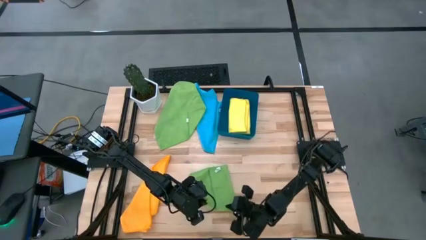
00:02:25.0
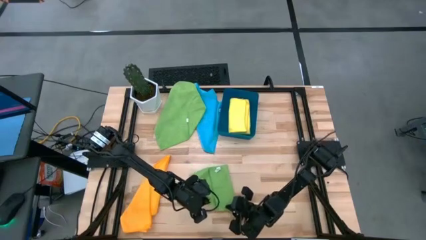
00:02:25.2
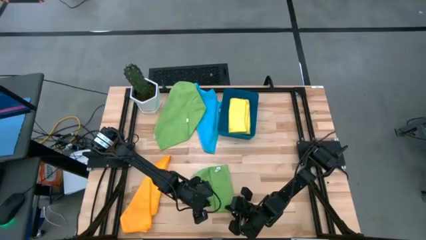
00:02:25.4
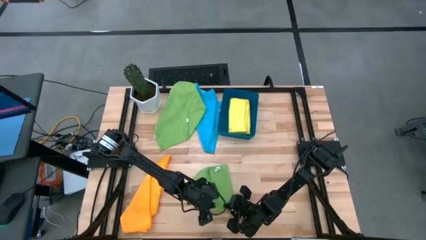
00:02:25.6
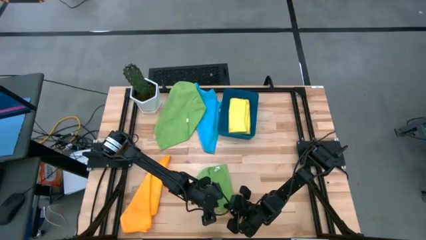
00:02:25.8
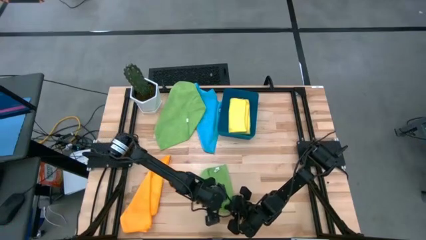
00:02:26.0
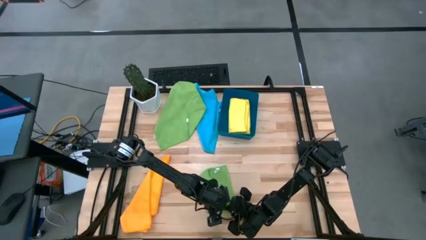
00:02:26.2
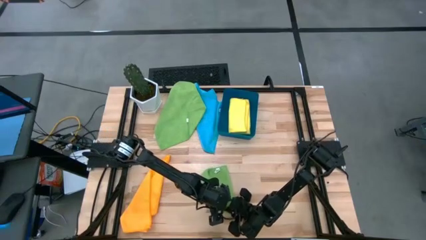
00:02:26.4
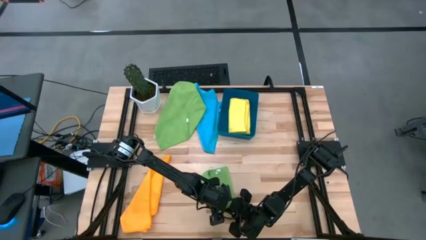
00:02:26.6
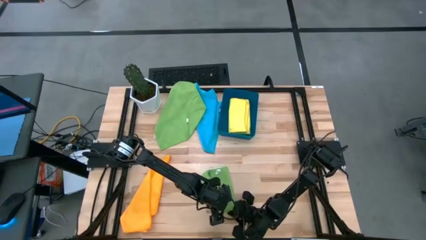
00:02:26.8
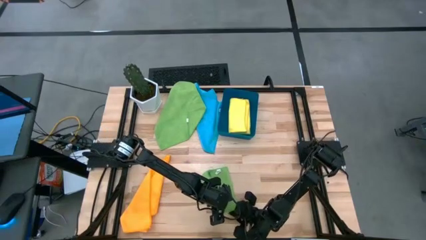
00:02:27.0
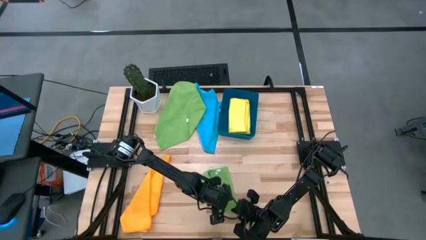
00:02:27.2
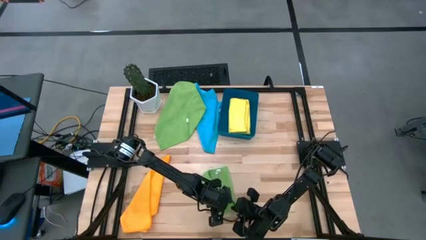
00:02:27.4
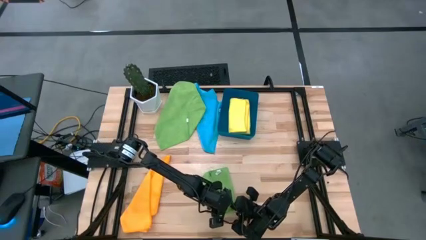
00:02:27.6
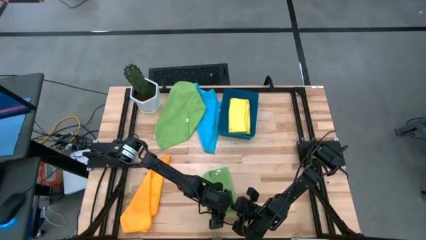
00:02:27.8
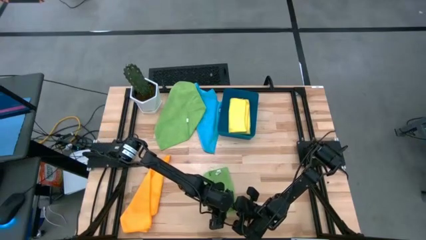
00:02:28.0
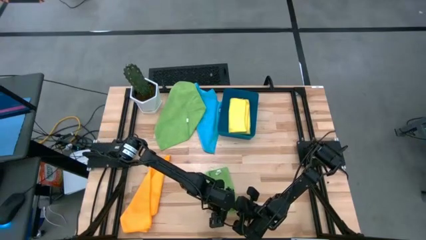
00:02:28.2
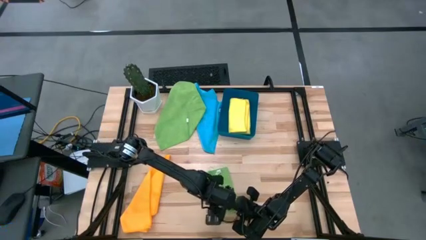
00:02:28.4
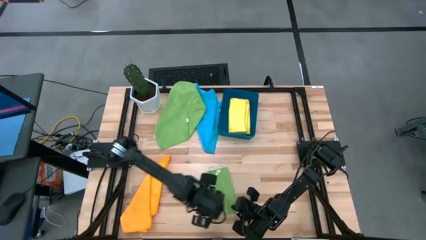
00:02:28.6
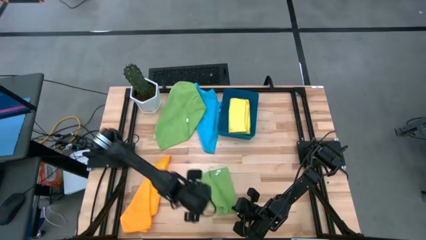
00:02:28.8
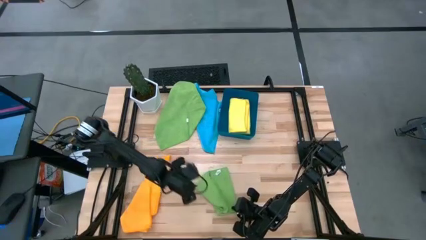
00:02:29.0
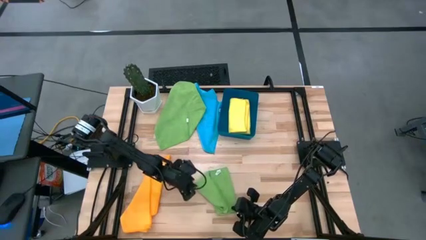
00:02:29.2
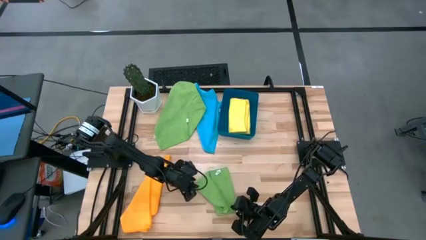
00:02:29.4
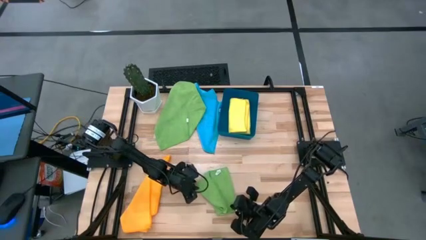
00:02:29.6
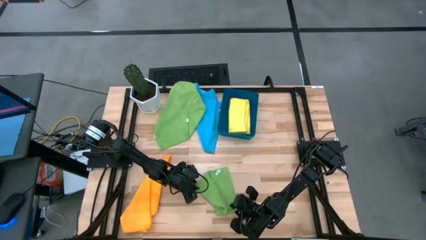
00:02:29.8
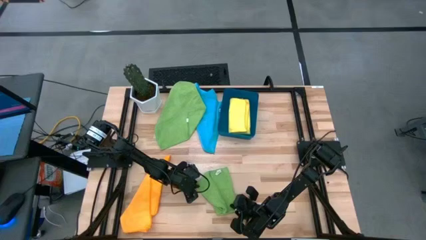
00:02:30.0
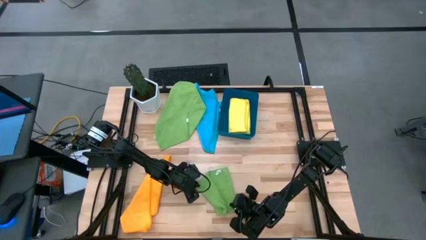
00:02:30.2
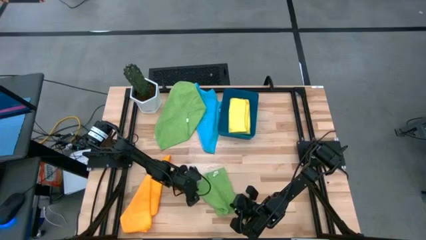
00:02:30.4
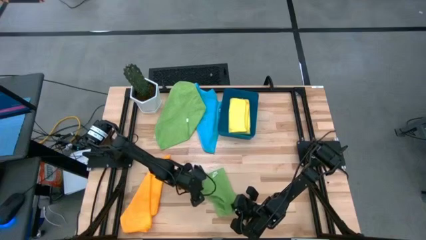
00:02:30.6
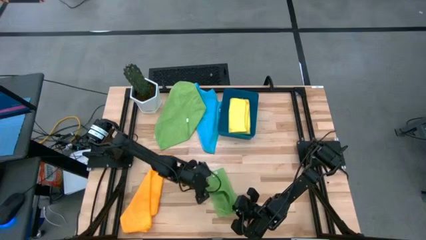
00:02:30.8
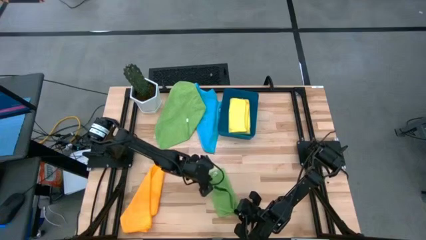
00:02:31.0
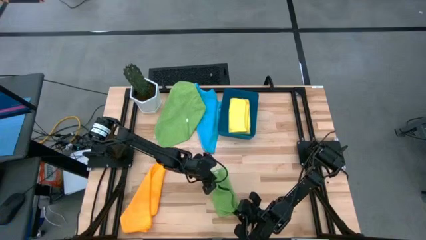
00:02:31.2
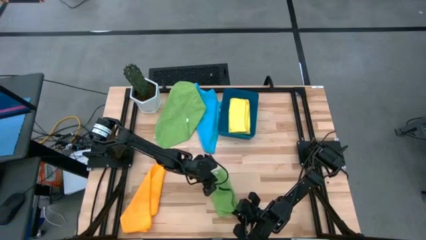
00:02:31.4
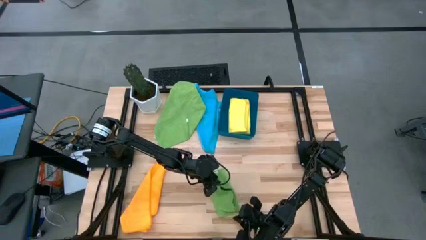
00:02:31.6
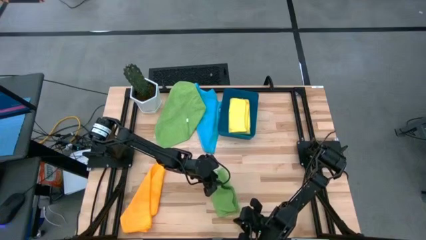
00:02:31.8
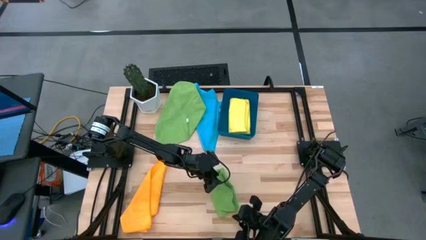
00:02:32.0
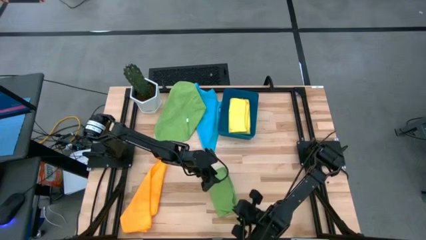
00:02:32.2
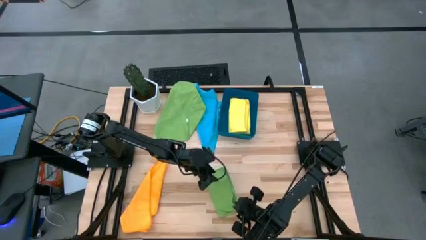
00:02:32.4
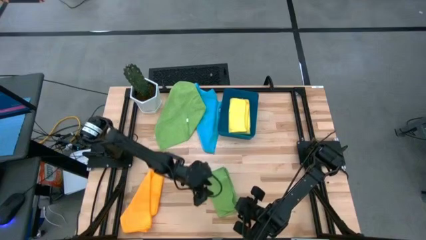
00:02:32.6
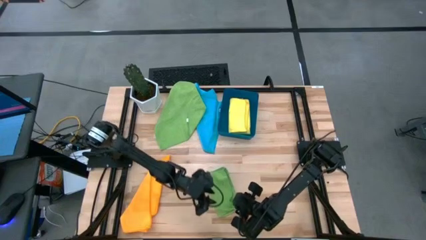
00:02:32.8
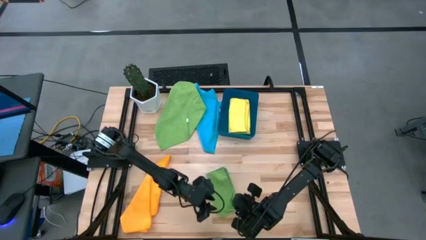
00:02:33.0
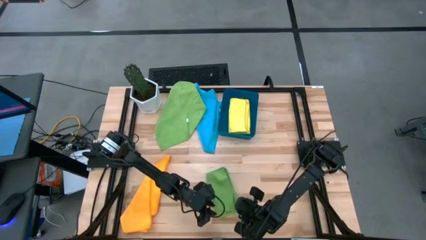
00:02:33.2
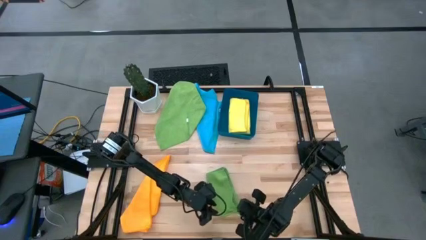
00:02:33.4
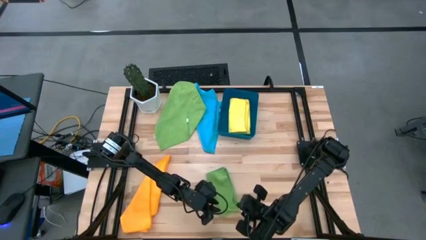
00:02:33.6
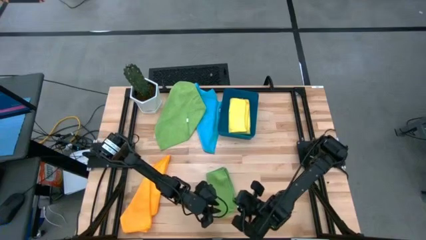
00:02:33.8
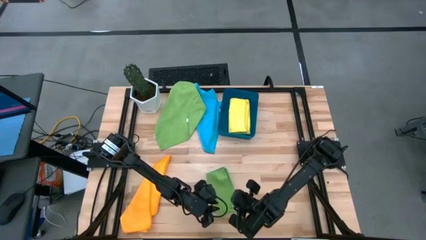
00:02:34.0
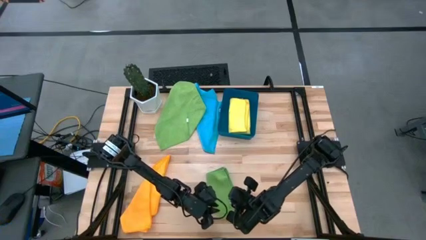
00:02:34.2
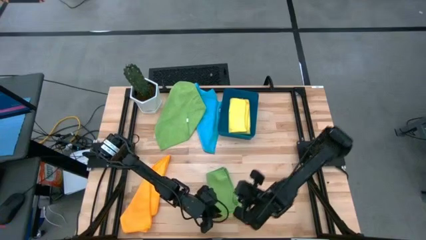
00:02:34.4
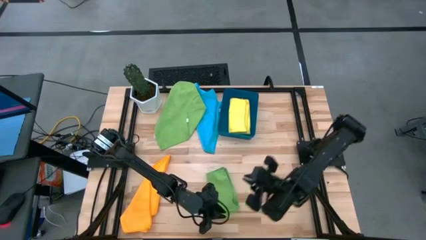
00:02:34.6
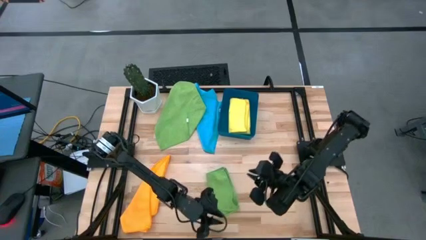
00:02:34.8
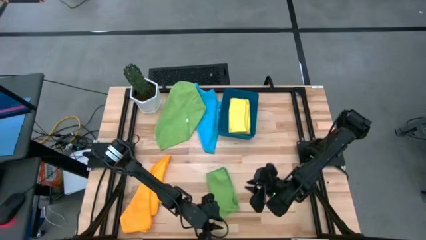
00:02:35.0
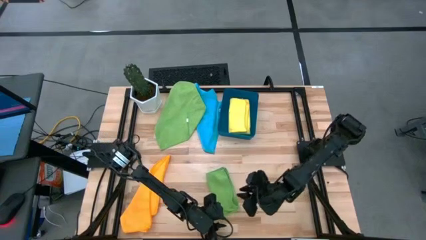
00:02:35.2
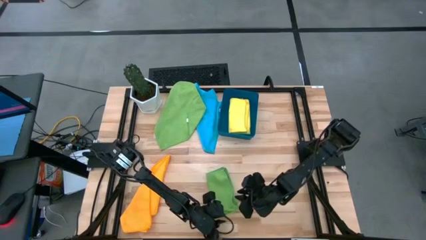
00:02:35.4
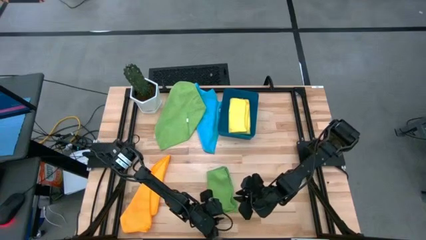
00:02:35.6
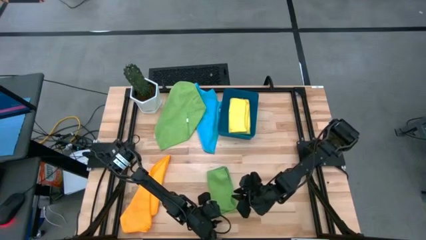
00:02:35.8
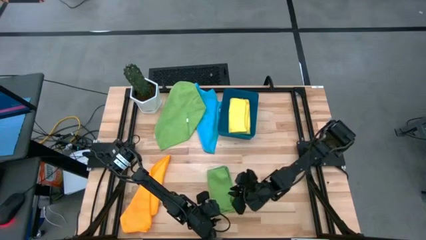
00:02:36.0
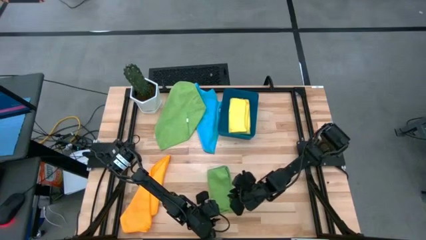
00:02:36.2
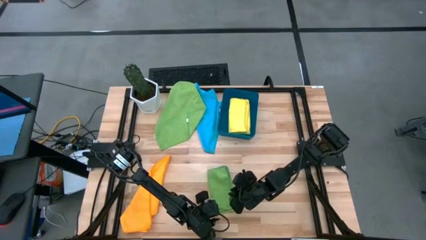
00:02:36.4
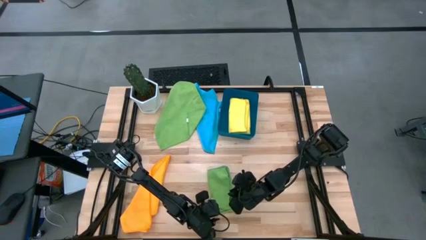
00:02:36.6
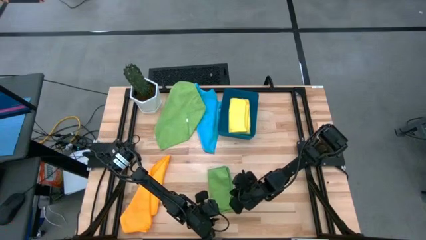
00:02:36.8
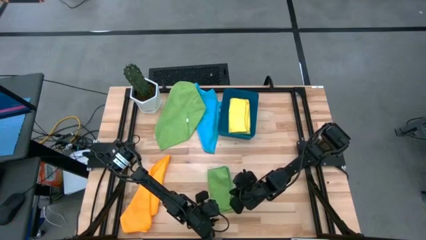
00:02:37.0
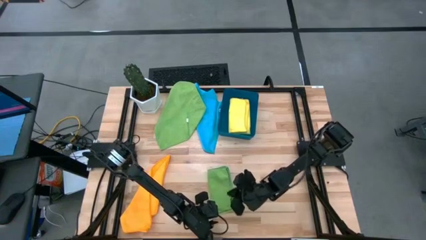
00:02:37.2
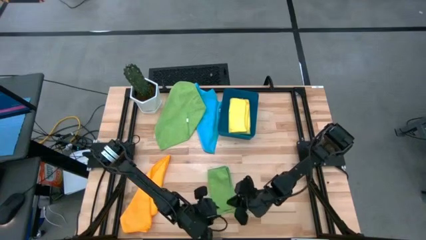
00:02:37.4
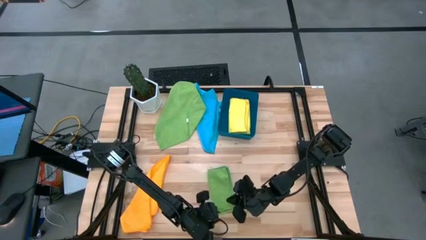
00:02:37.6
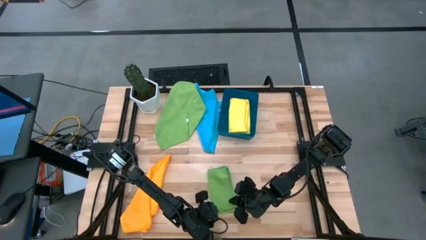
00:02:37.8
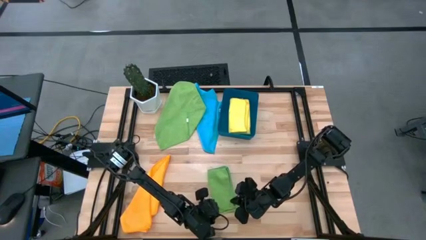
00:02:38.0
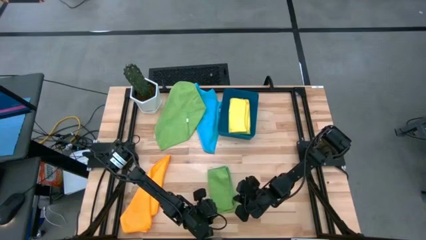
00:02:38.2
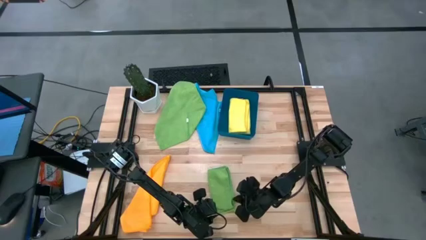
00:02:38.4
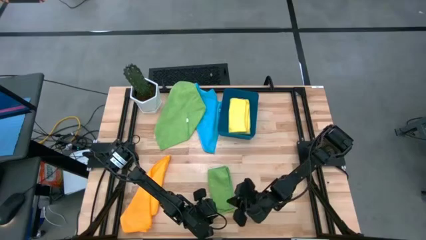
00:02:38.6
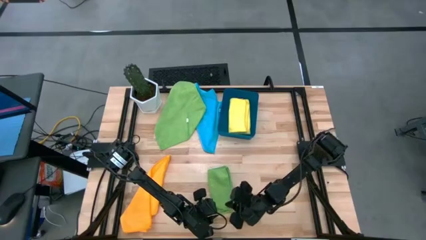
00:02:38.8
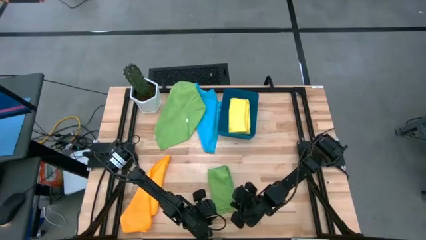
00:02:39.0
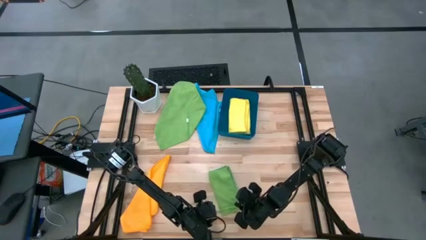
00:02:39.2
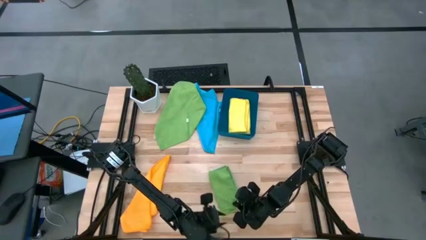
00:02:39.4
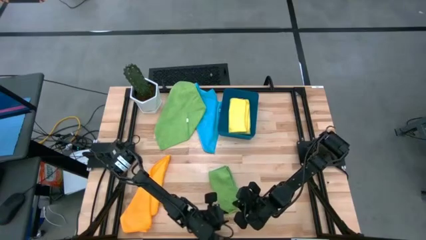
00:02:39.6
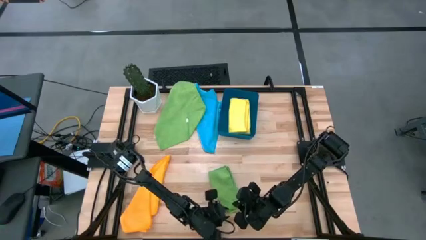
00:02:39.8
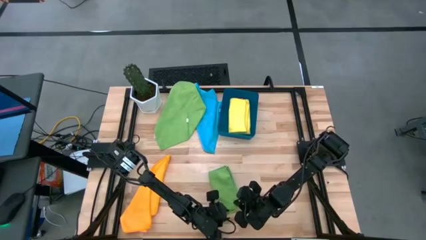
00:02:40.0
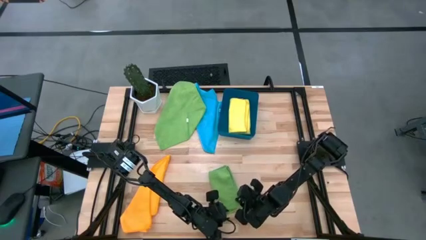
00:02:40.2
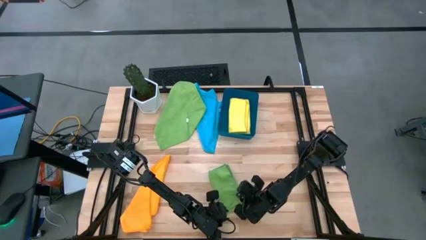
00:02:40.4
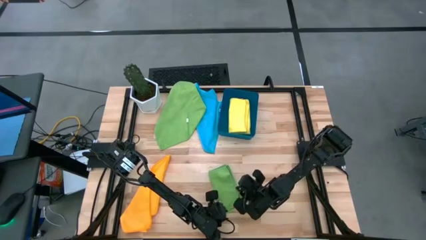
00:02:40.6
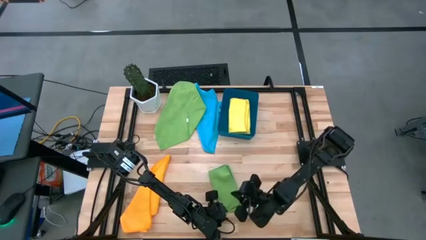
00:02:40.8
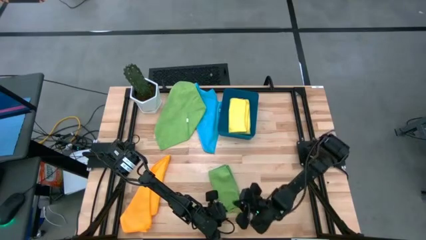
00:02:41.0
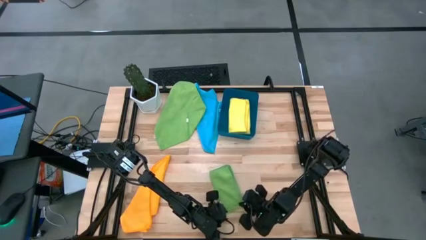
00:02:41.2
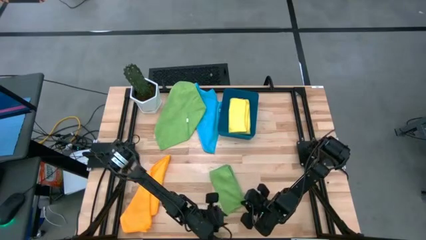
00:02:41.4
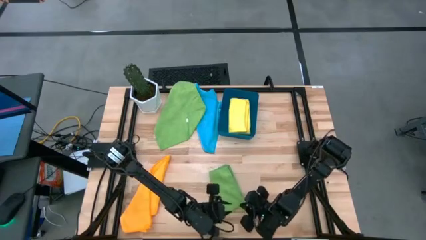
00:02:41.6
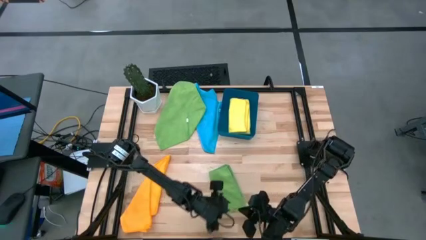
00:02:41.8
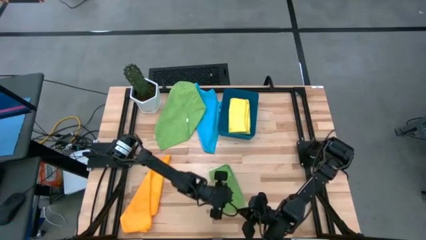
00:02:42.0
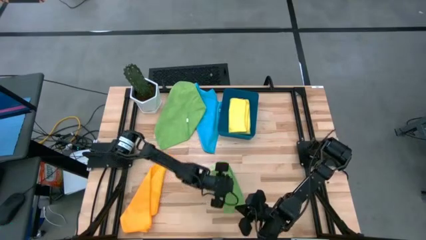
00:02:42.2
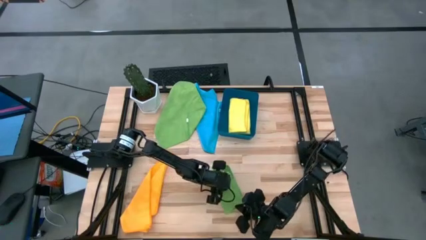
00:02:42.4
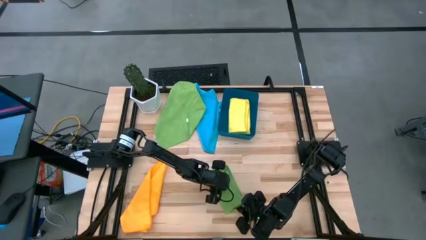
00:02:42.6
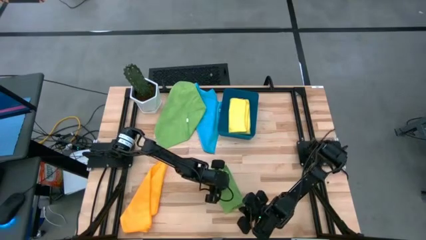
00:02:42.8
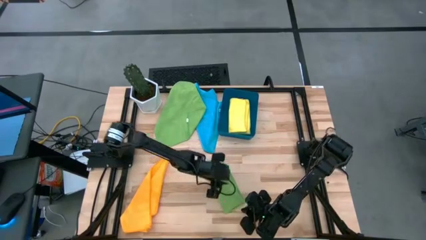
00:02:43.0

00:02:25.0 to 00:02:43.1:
Task: Fold microfiber towels
Fold the right green towel
